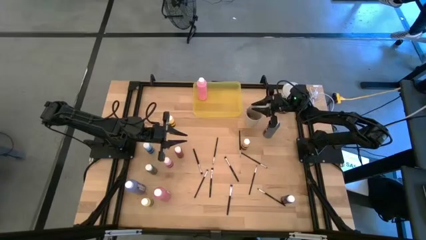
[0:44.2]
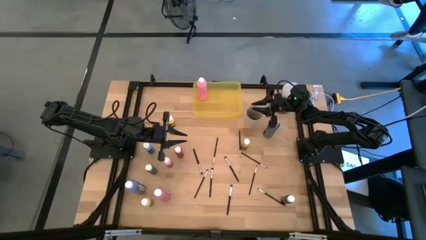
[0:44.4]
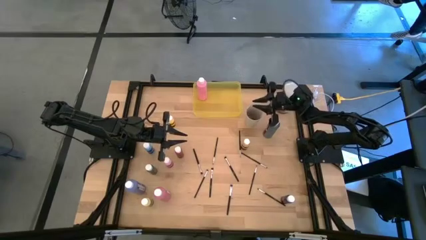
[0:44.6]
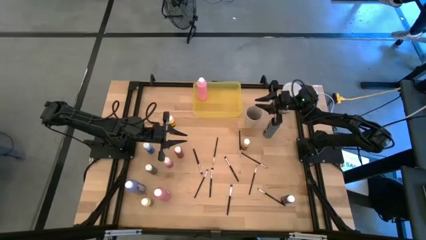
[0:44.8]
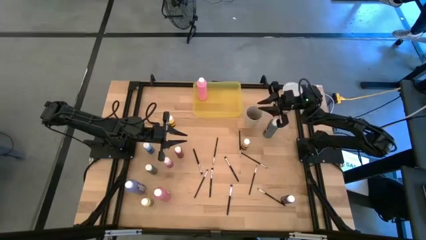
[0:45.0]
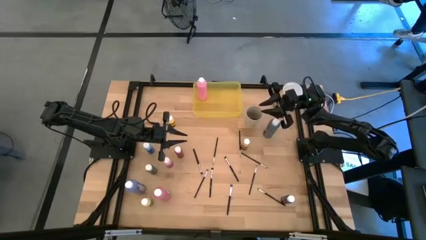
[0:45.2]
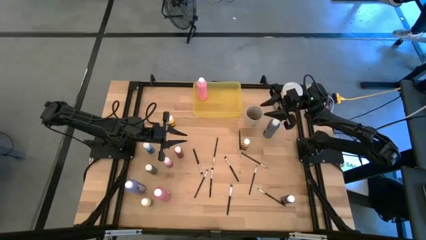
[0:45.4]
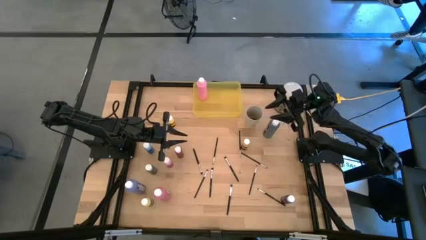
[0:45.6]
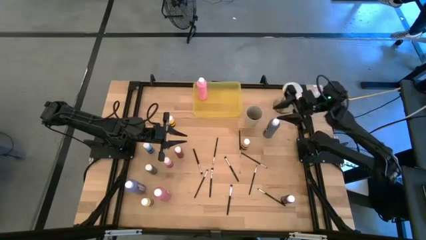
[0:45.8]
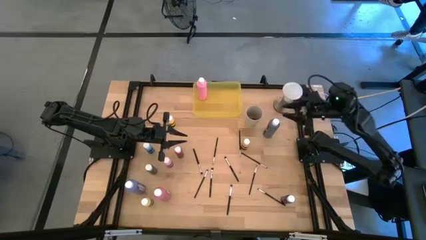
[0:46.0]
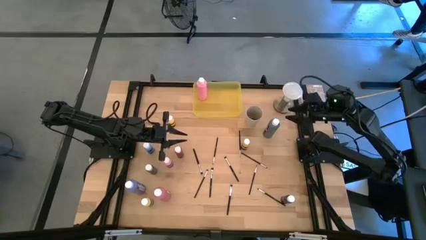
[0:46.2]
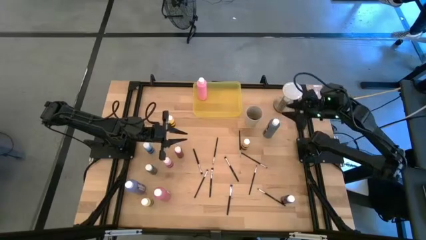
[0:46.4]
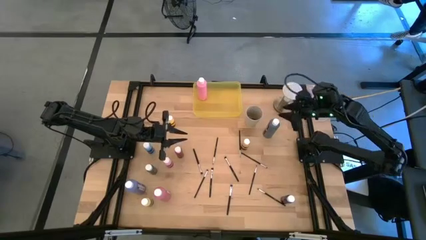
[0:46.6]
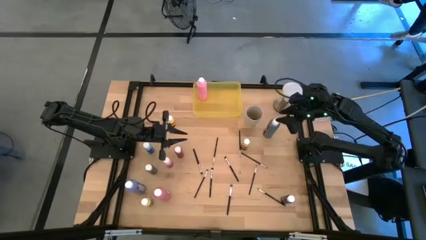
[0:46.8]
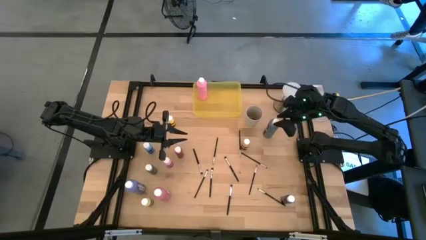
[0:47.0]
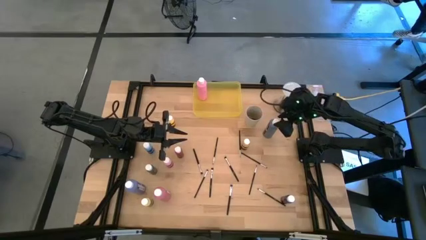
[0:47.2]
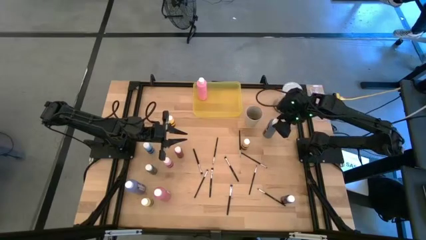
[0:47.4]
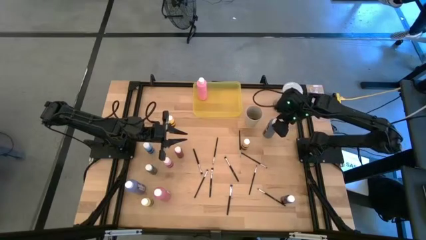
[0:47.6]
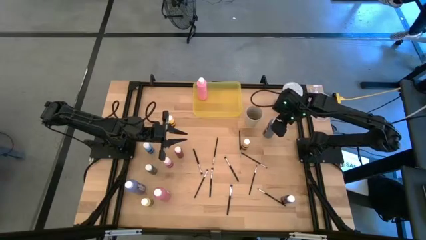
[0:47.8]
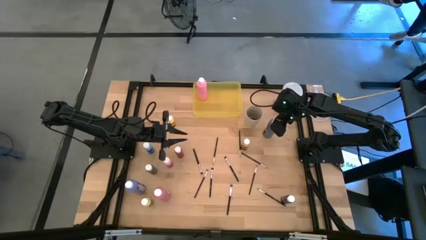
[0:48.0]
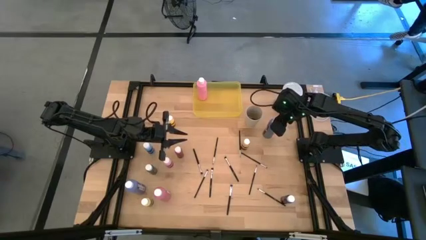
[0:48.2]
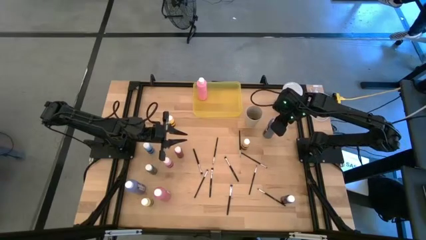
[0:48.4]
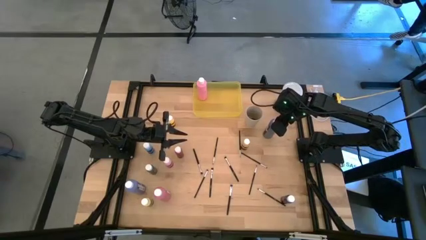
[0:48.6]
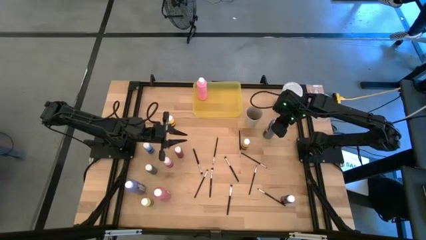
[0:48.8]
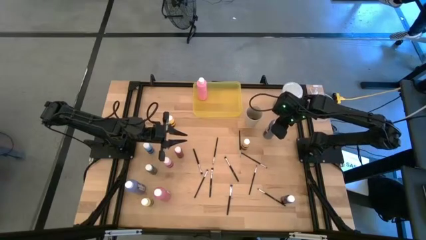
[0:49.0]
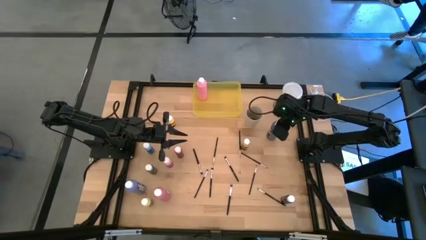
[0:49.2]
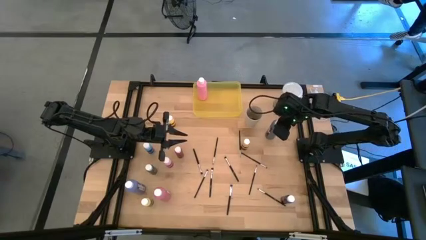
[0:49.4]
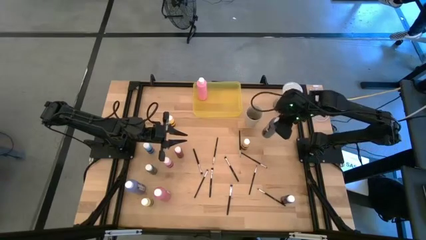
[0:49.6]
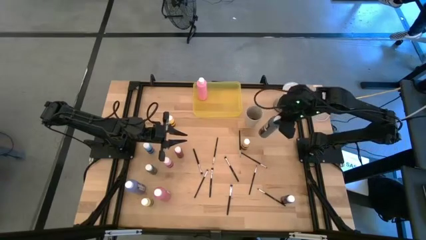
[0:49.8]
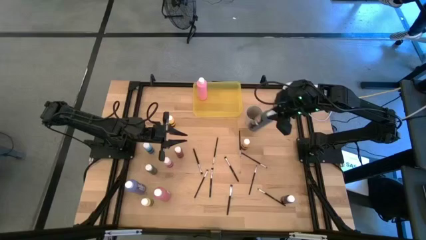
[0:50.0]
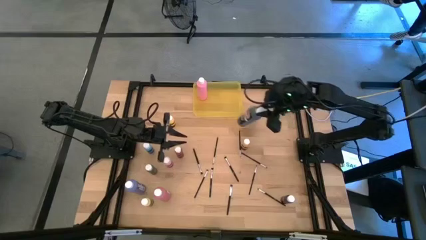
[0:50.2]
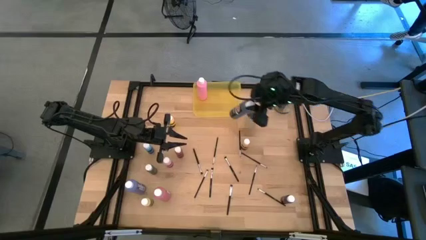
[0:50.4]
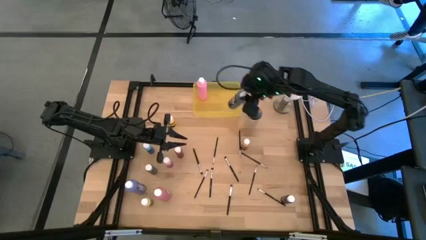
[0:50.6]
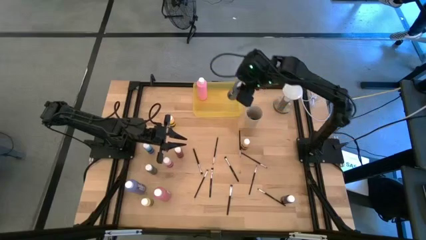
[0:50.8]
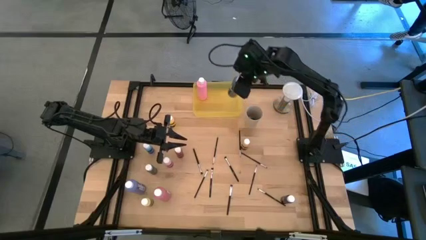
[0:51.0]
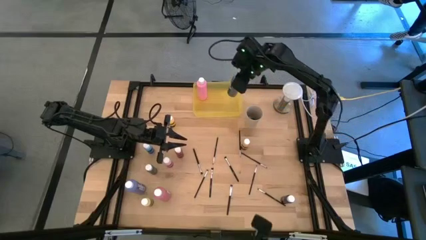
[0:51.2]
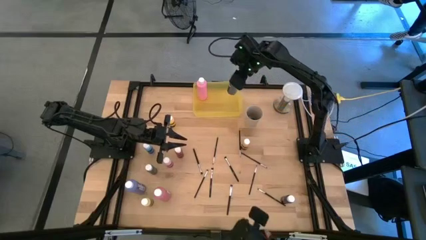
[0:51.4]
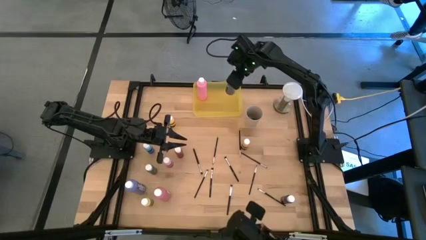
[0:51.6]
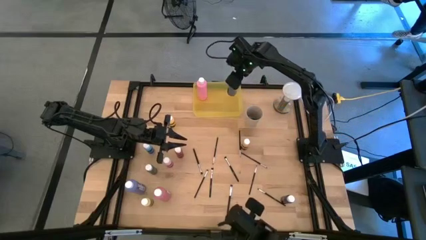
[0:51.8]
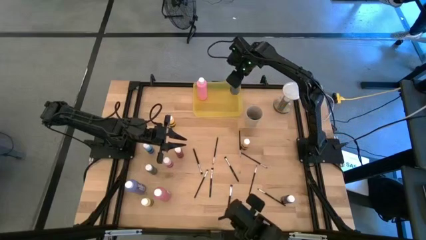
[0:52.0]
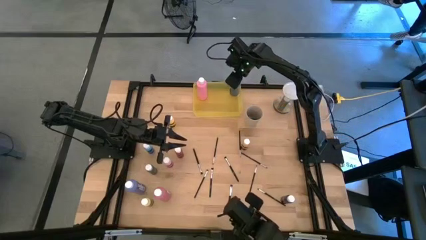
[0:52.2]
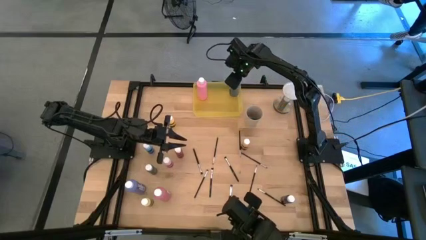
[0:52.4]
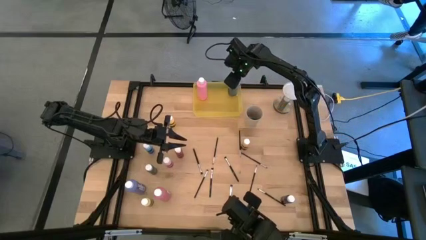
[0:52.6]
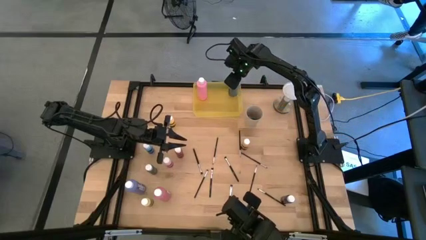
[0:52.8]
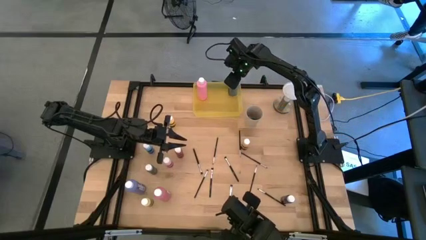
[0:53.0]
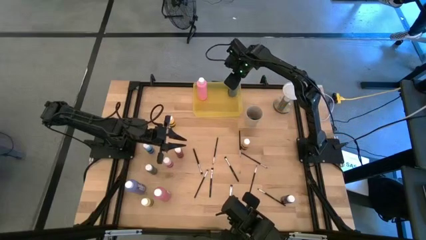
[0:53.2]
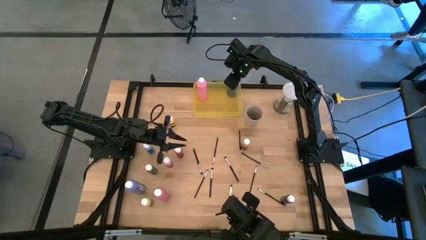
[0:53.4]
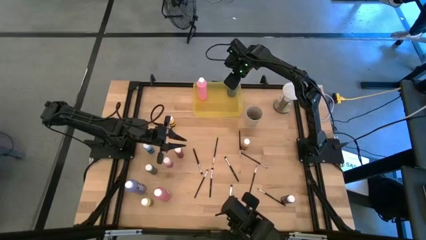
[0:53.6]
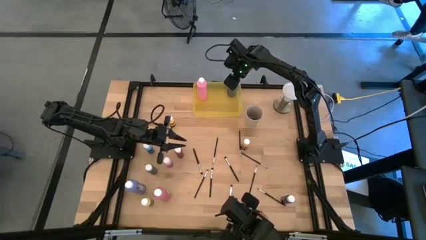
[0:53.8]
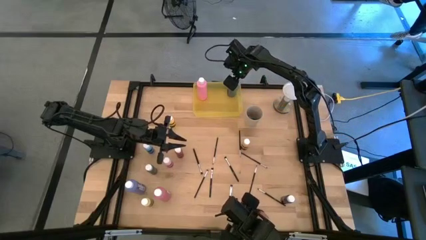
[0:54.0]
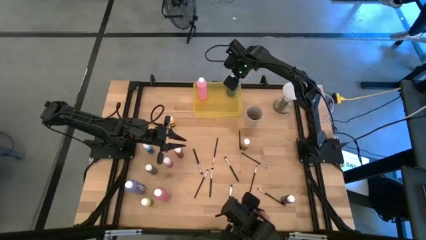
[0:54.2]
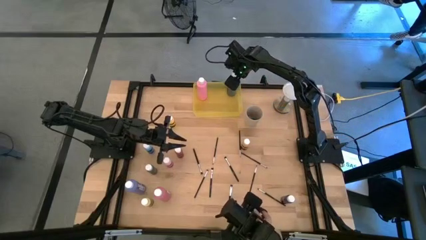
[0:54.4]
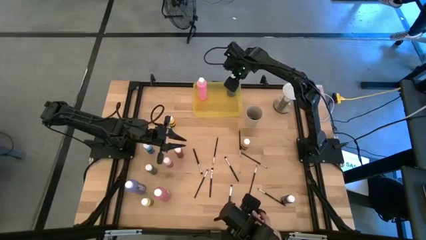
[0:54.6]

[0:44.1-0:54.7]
Task: Pick & Place Paint Supplies
Put the large black paint bottle into the yellow bin

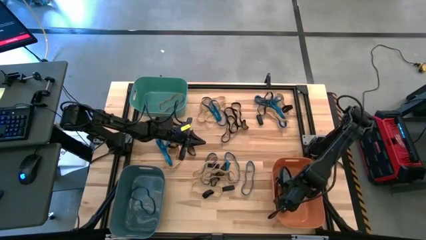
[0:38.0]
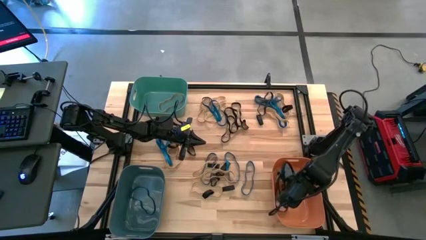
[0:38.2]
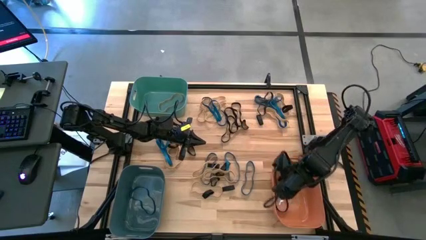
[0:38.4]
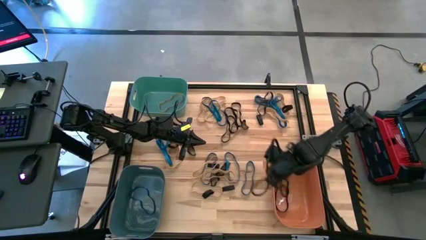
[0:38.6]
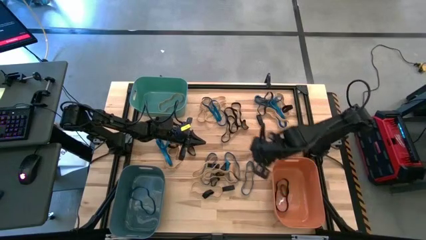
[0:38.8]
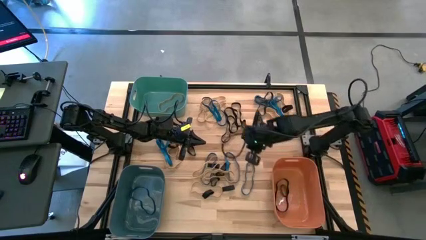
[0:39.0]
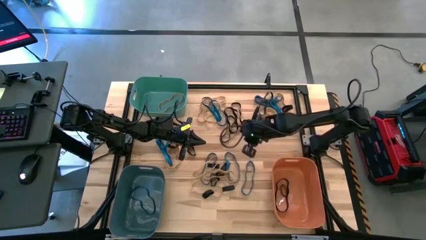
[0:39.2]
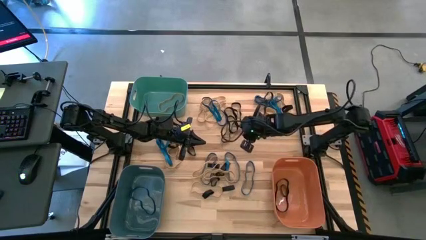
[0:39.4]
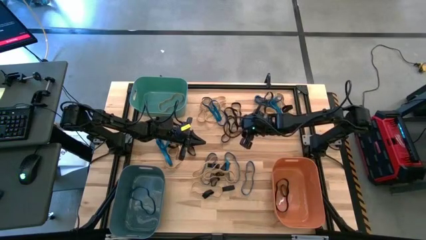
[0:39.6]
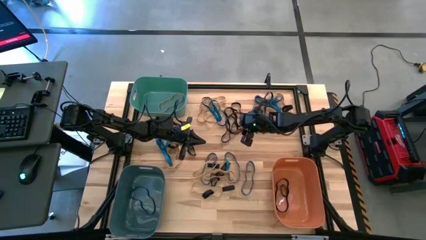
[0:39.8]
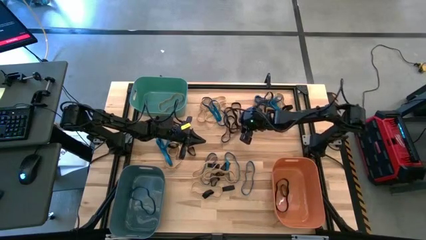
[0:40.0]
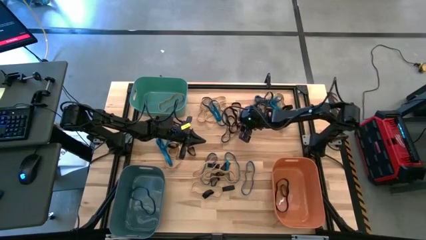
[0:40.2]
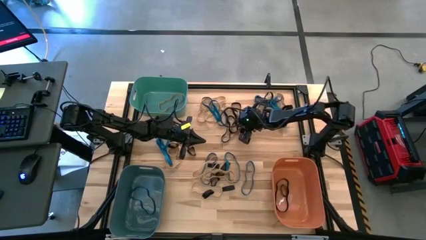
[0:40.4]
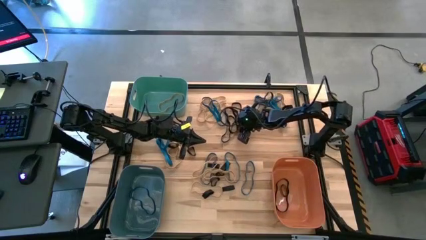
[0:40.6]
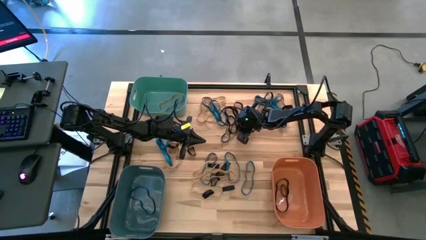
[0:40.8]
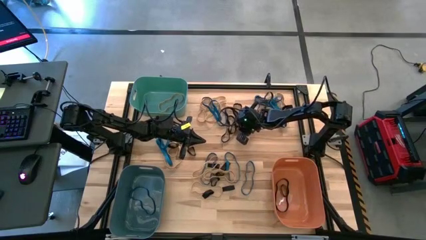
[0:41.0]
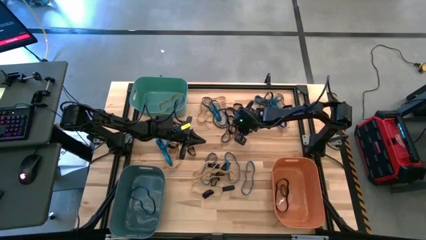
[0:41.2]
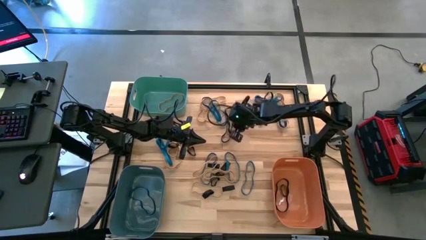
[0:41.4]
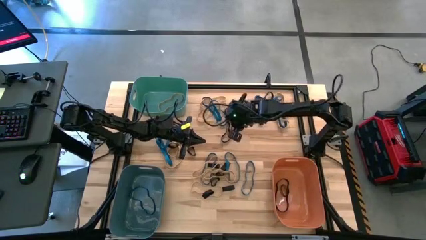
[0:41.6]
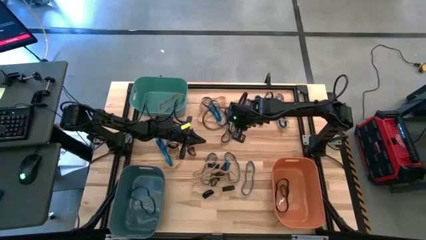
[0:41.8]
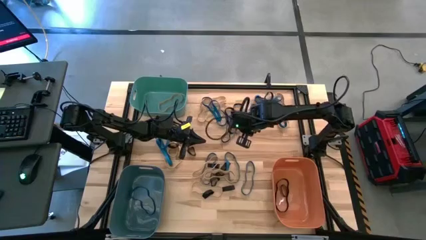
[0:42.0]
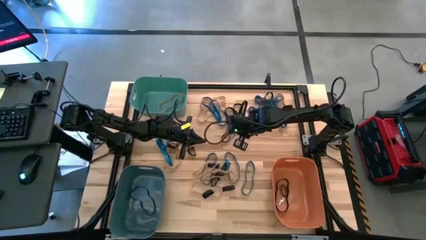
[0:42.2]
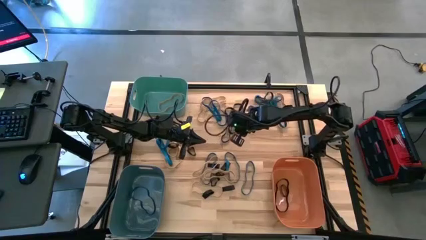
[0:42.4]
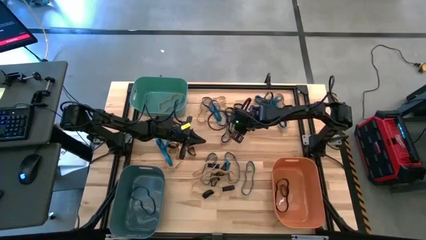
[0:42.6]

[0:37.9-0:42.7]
Task: Sort rubber bands into baskets
Put the black rubber band into the orange bin

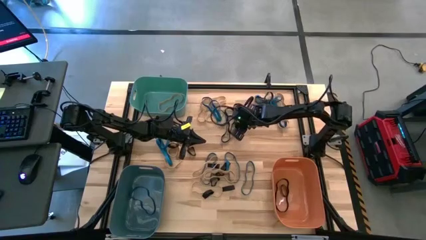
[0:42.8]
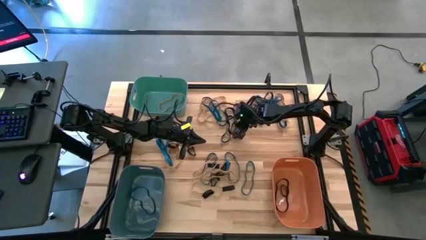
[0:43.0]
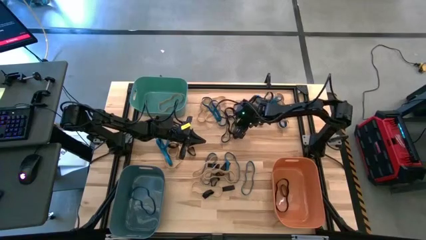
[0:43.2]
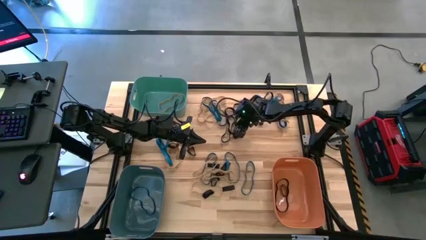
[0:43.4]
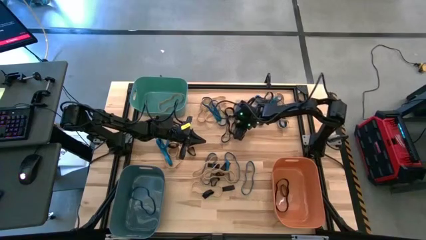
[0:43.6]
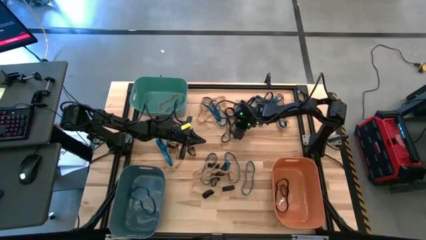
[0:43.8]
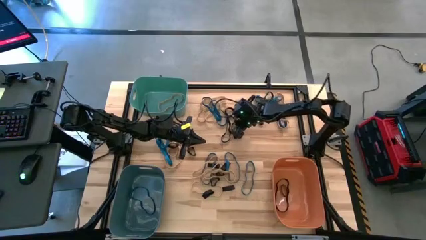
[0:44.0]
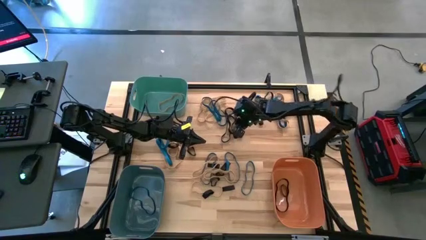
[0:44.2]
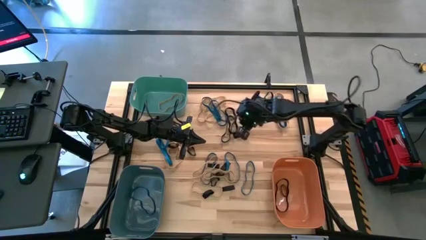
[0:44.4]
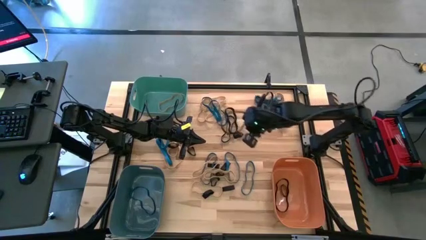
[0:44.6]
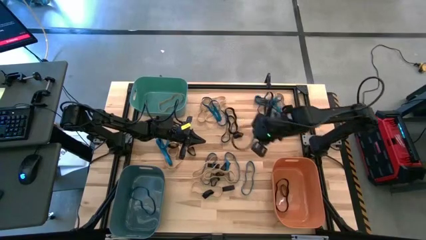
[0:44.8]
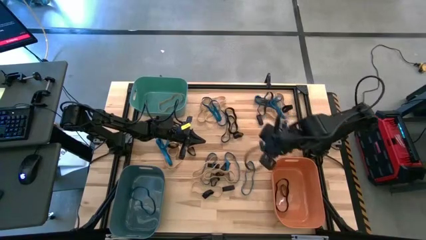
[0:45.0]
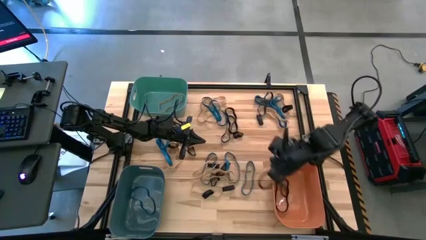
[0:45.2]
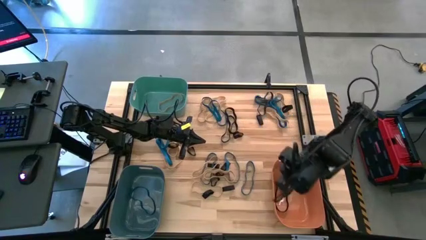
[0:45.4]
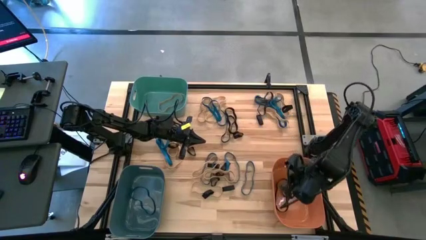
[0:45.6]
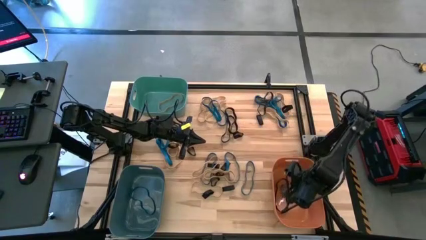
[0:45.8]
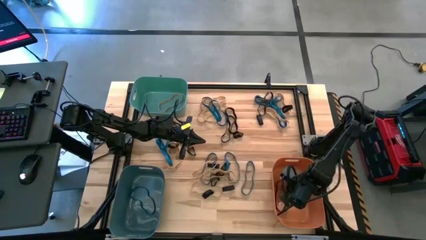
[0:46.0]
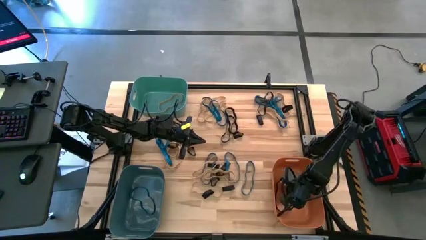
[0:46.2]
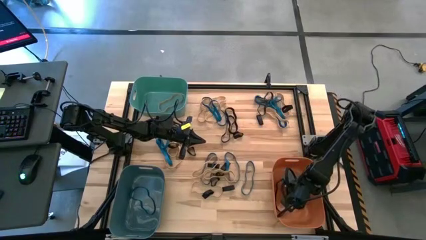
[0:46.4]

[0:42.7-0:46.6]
Put the black rubber band into the orange bin
